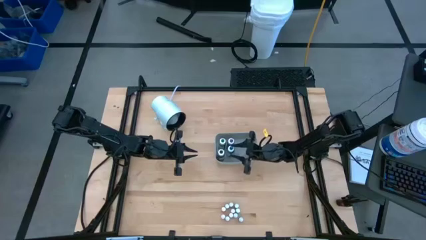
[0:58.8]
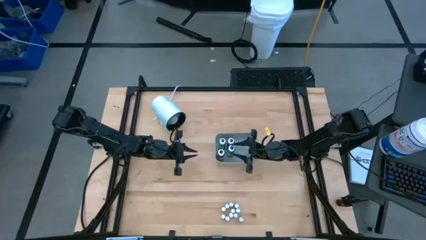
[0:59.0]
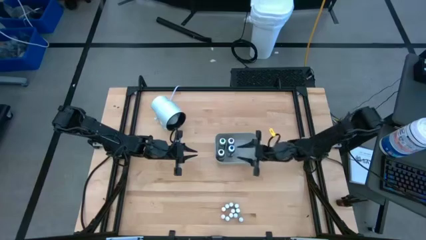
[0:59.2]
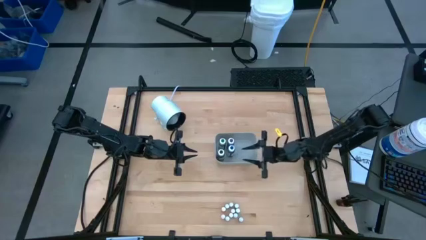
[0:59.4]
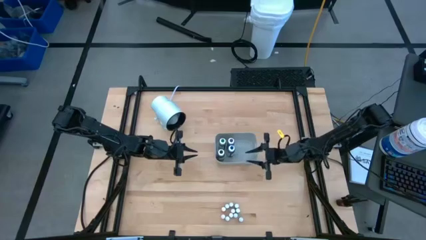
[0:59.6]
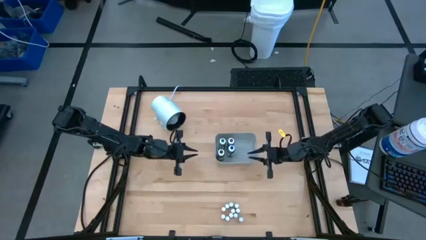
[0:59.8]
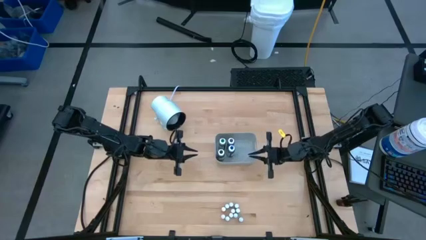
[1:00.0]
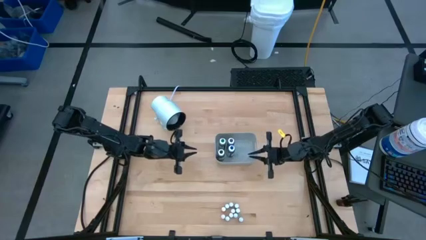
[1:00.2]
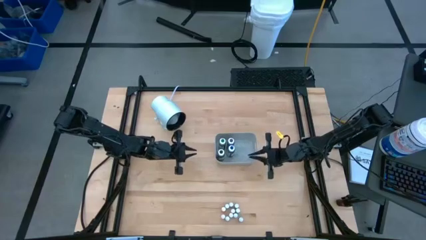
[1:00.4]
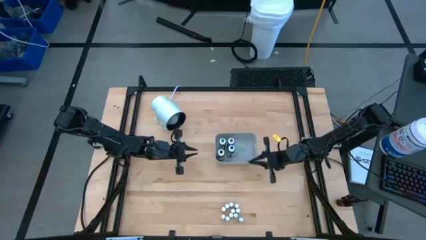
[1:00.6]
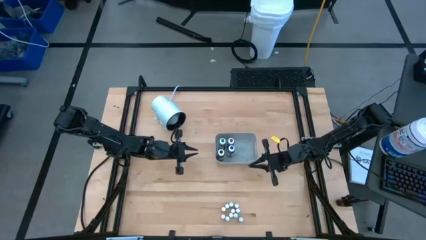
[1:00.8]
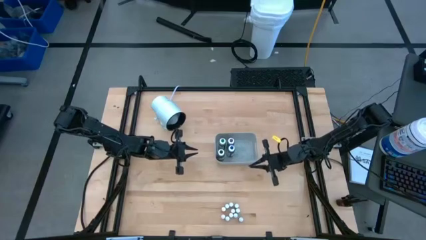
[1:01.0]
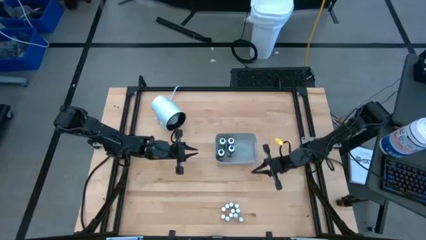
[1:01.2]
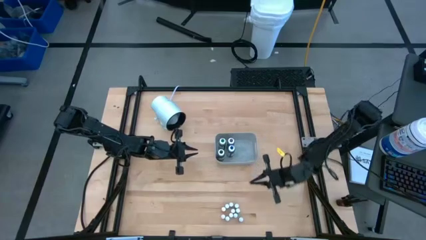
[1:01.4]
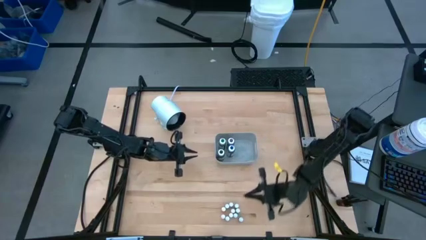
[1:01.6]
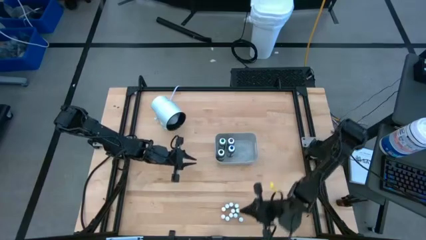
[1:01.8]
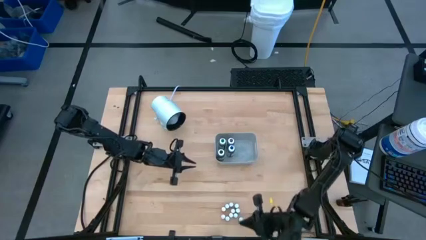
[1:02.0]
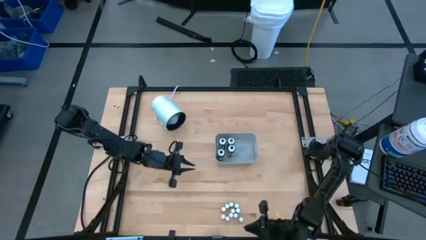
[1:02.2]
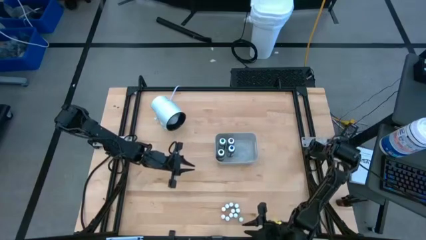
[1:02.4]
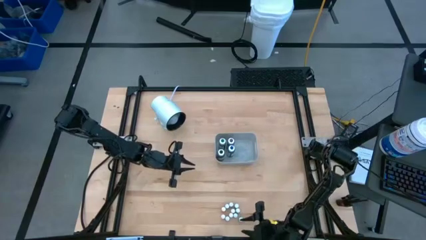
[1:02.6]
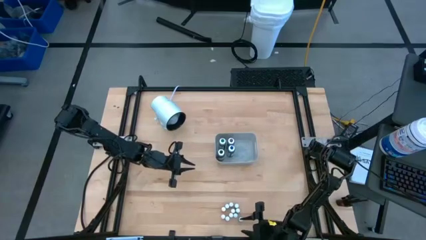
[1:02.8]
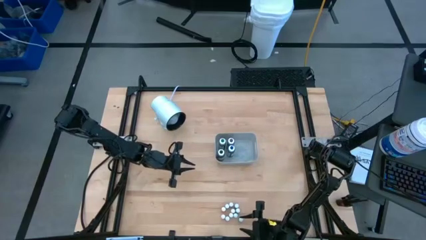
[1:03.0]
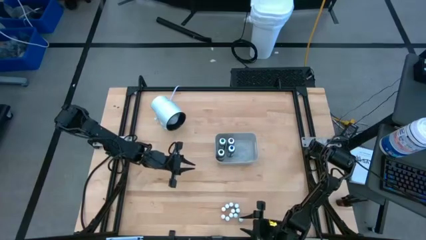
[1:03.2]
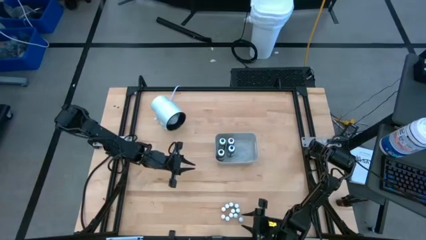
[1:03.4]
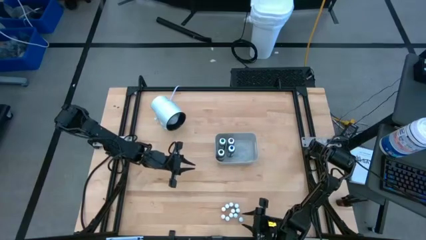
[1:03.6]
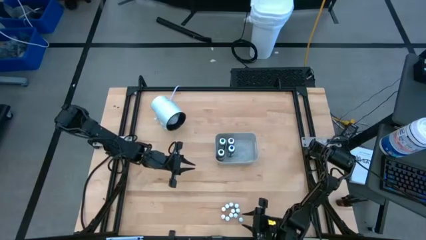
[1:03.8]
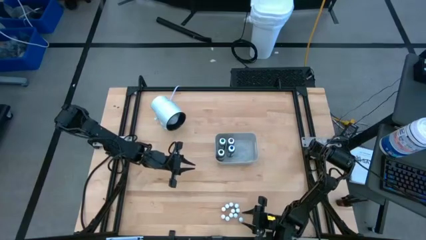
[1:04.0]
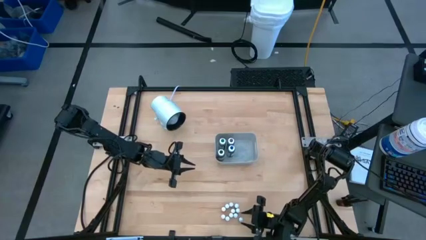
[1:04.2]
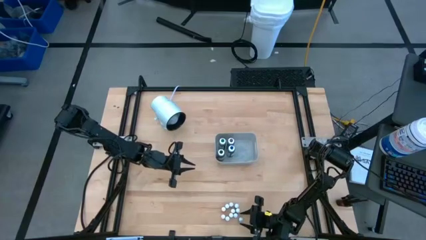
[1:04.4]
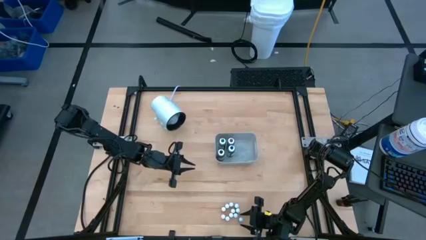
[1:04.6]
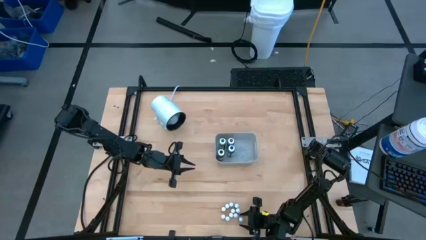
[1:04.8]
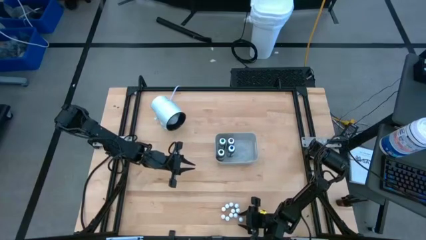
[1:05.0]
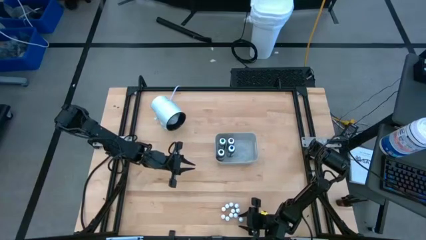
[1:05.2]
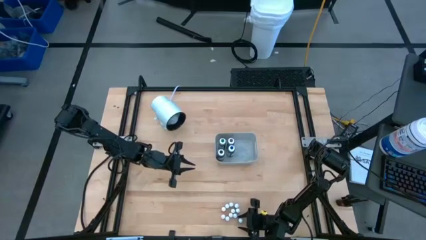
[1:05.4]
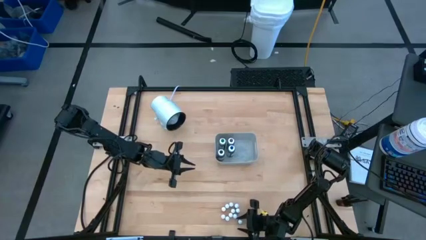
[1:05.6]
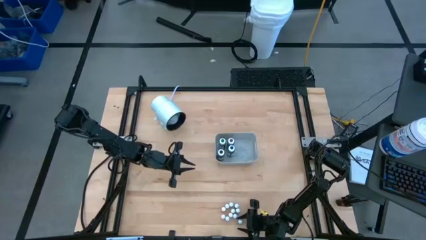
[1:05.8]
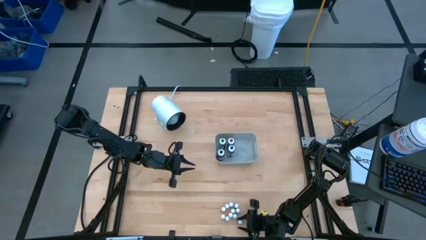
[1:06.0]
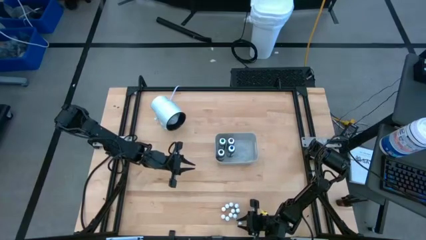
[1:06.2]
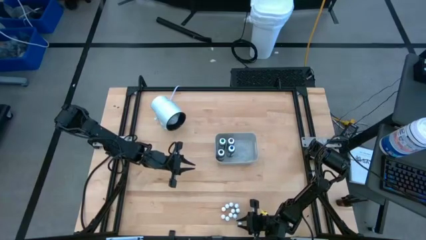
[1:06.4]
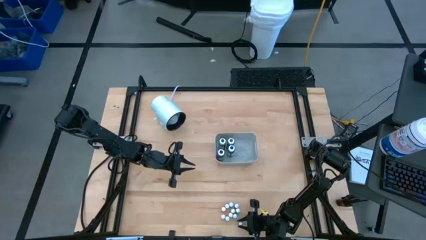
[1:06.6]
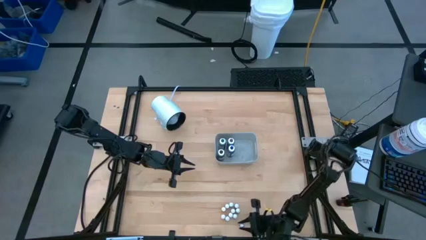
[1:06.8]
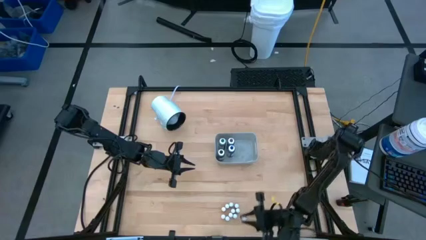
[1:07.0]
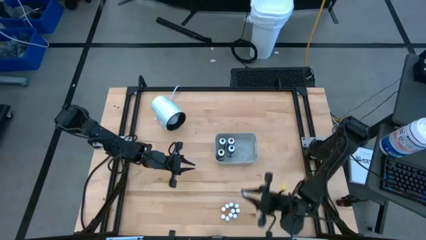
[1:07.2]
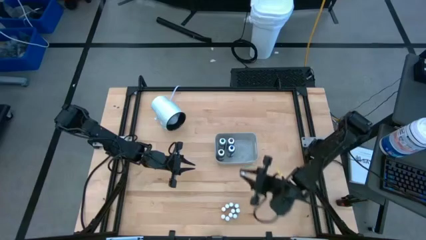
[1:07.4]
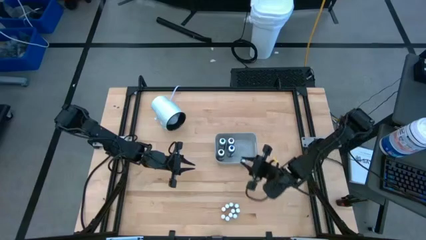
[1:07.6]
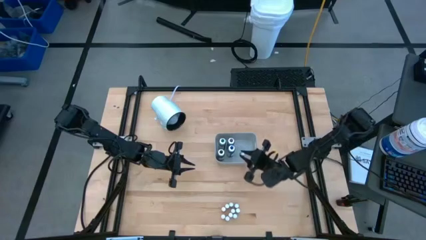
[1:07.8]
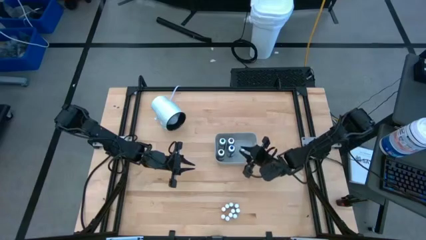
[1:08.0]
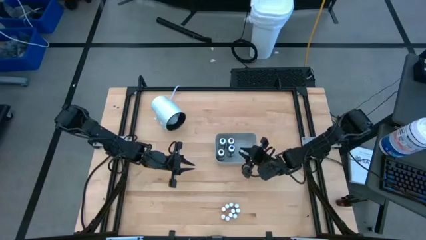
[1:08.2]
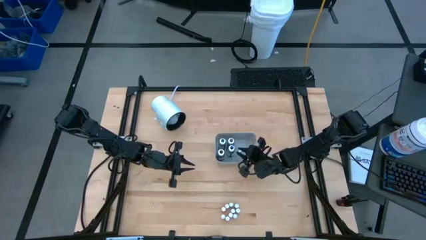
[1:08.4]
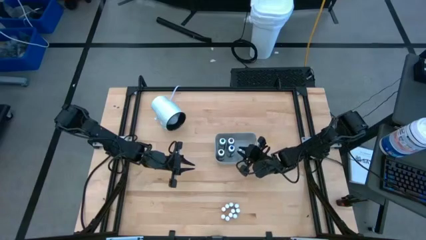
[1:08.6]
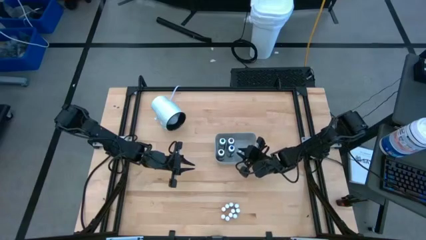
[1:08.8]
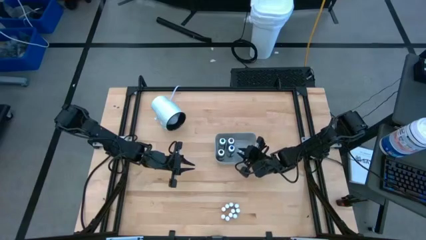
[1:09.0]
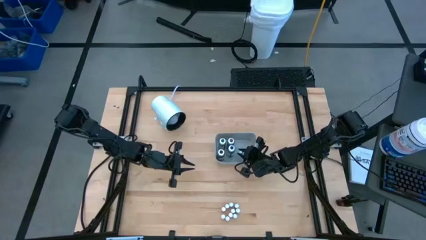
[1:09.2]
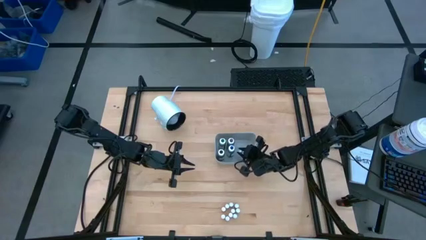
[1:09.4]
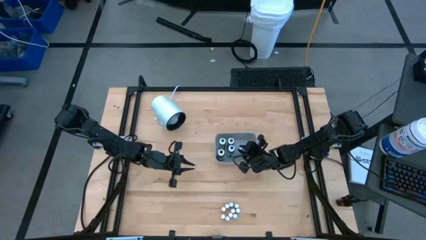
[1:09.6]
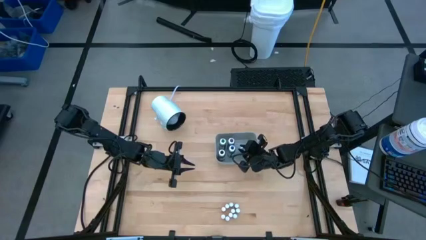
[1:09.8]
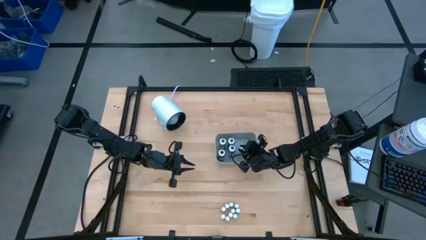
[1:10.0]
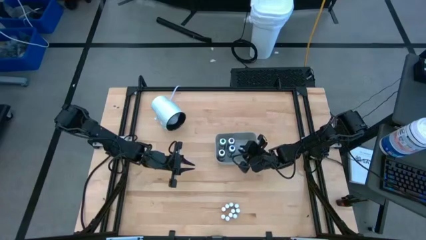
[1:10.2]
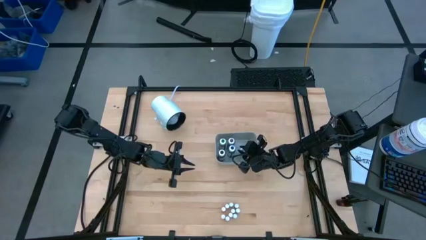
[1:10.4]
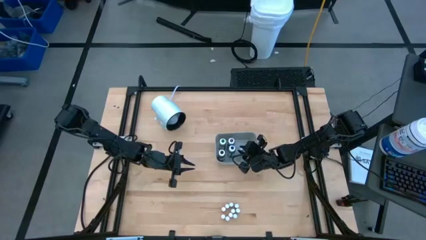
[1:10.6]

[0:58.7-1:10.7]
Task: Pick & Place food coloring
Put the small green food coloring bottle into the gray bin

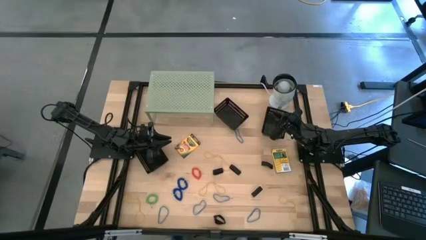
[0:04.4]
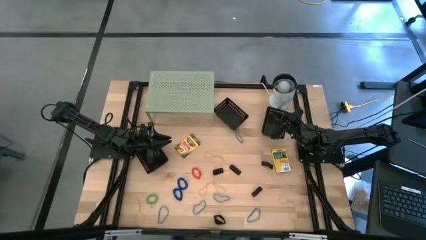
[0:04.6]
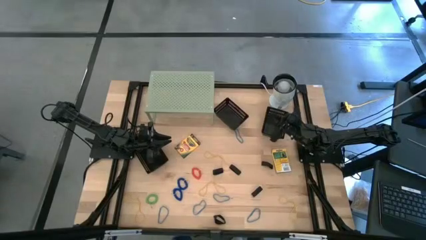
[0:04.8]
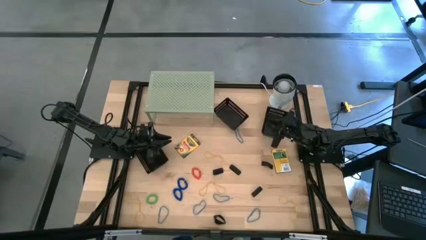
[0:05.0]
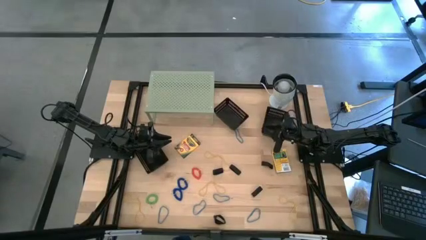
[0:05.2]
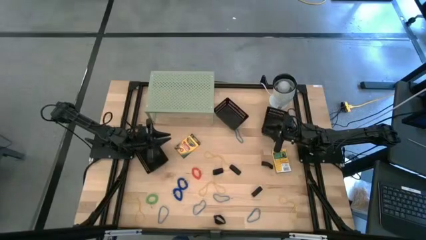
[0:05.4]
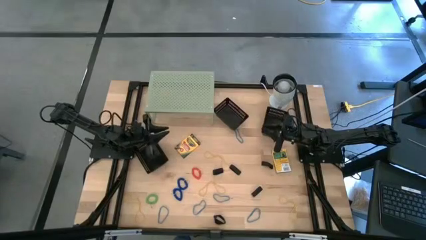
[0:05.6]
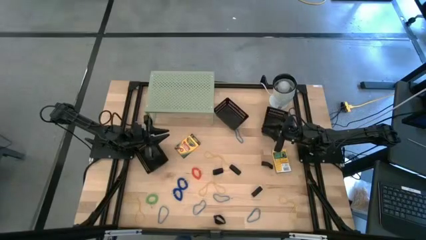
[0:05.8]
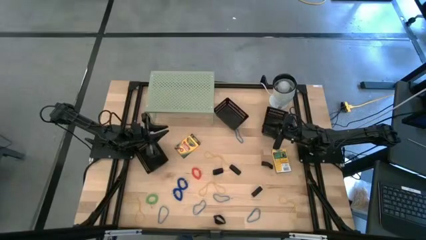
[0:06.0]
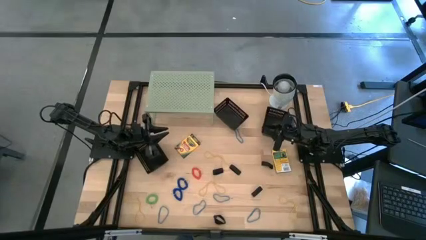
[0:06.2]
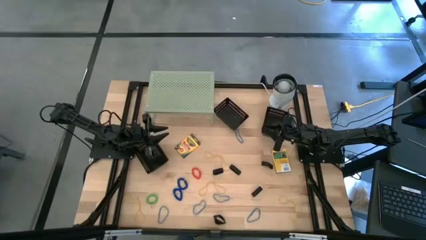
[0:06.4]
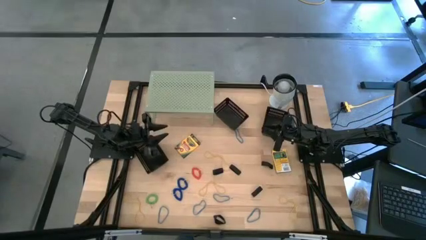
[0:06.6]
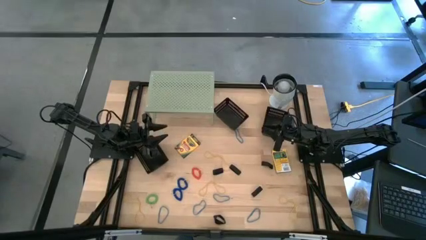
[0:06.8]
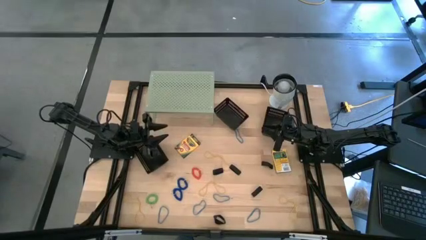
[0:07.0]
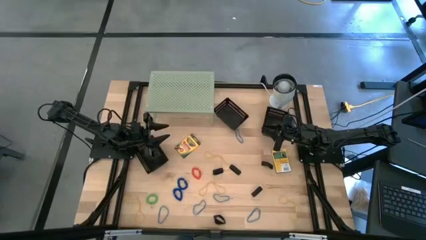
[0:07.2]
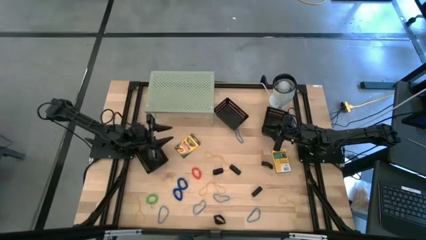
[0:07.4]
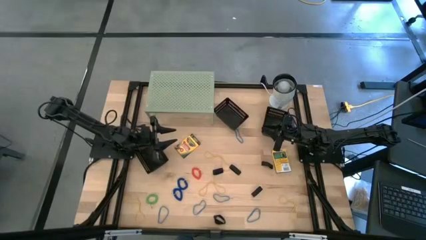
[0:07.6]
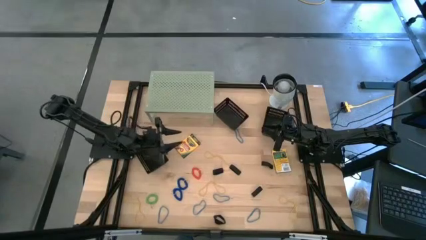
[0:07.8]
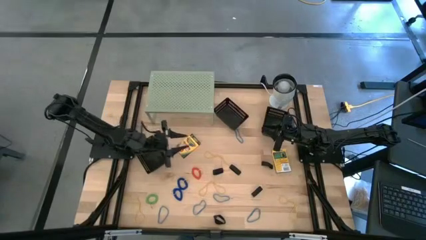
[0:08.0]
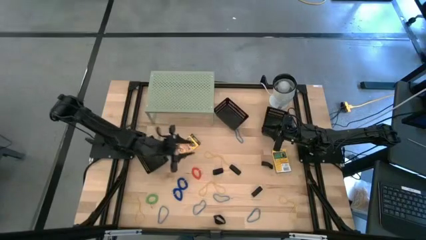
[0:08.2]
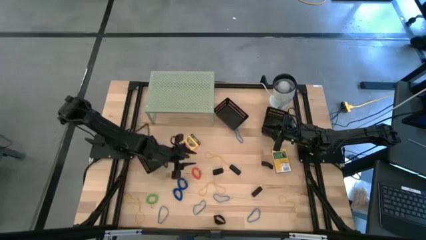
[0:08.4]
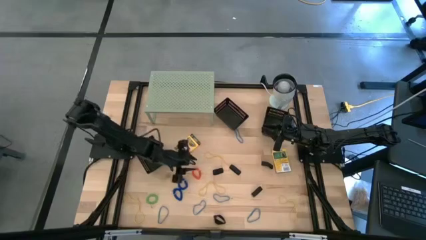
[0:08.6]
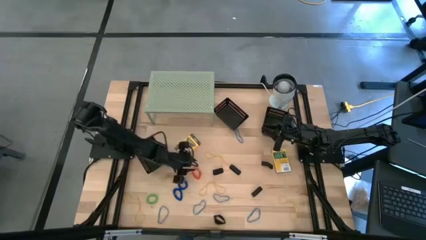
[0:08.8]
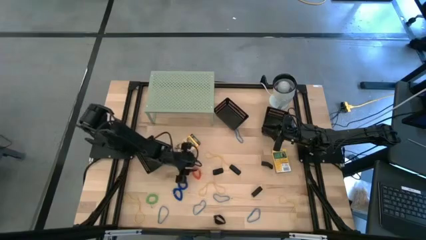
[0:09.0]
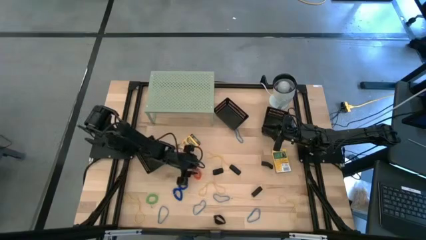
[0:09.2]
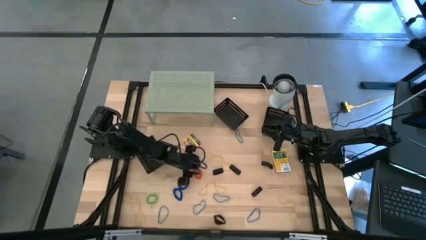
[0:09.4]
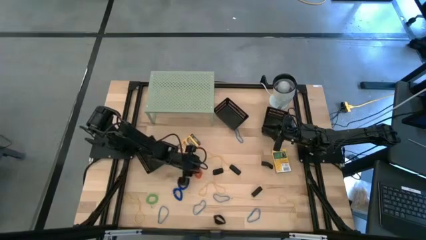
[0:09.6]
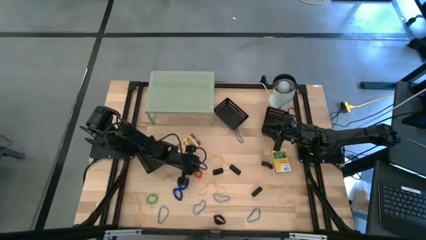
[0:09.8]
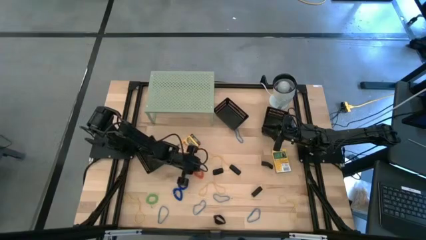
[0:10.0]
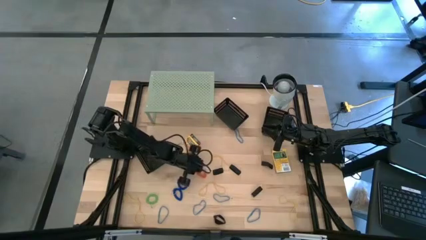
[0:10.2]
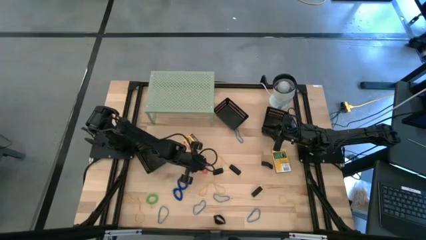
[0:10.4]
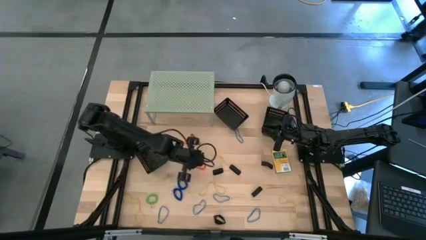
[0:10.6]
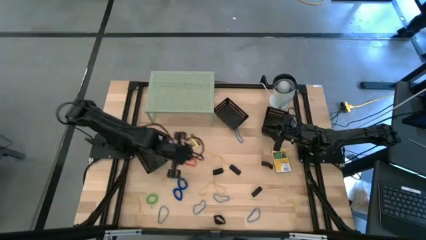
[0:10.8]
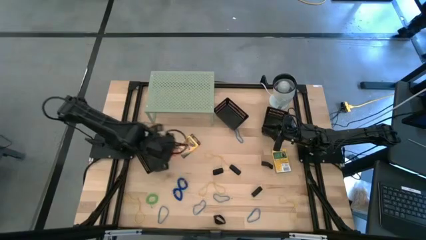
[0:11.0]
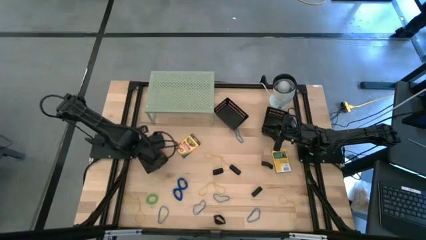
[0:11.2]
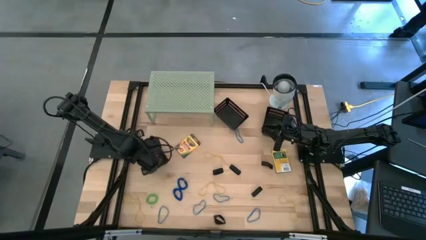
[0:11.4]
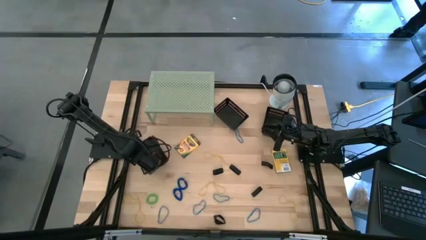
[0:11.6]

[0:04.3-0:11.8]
Task: Pick & Place Office Desk Supplies
Put the orange keychain into the bottom black bin
